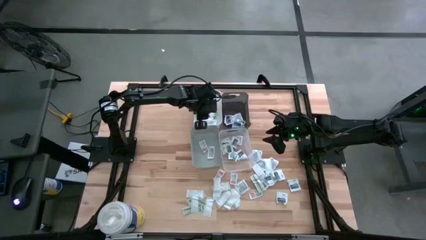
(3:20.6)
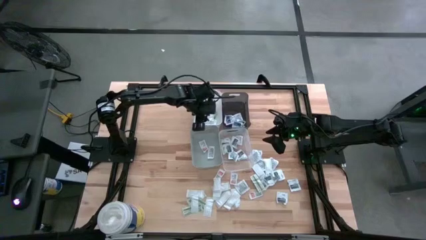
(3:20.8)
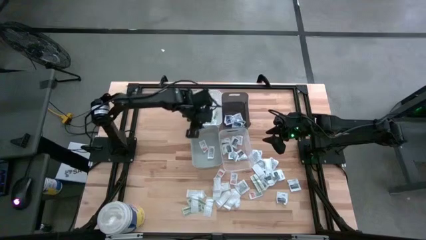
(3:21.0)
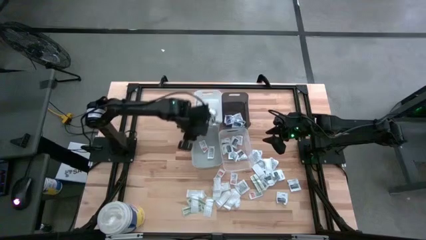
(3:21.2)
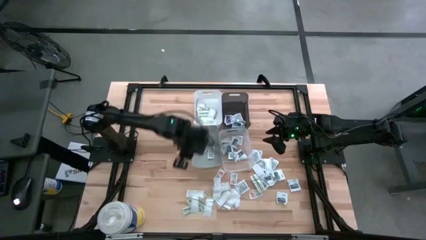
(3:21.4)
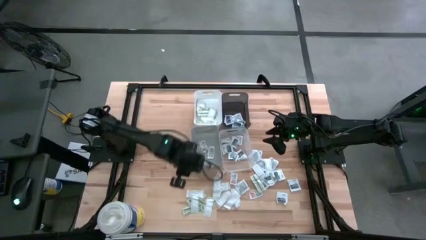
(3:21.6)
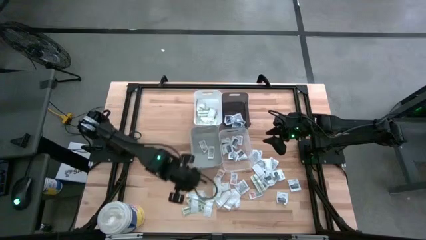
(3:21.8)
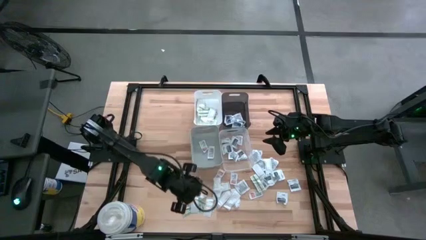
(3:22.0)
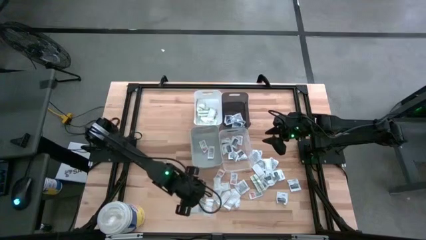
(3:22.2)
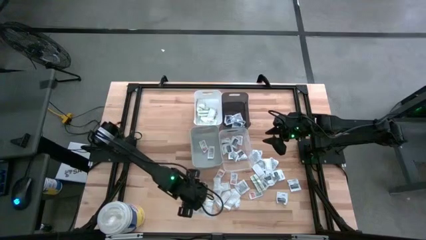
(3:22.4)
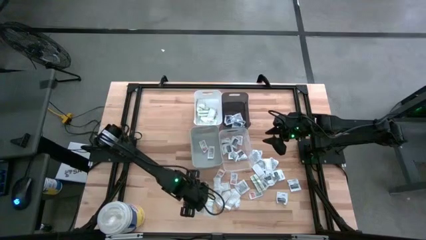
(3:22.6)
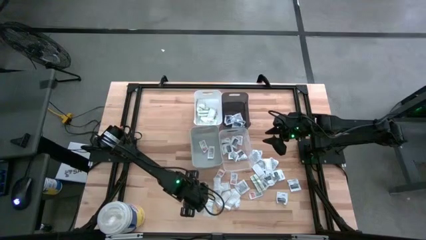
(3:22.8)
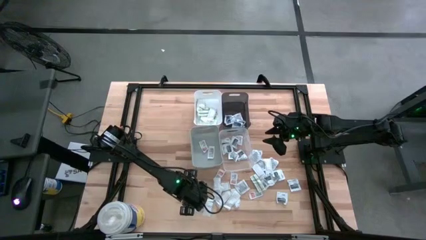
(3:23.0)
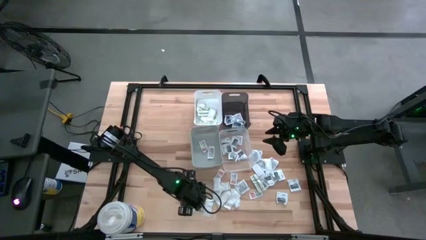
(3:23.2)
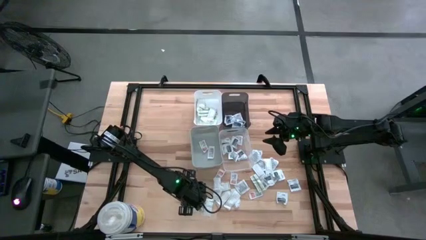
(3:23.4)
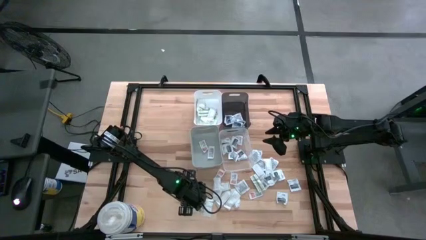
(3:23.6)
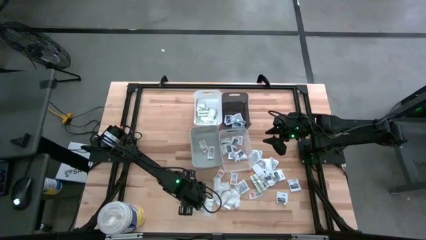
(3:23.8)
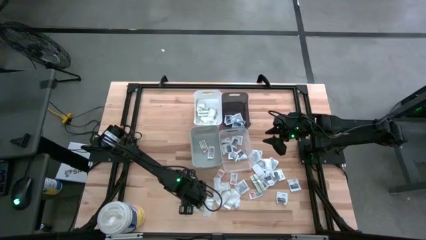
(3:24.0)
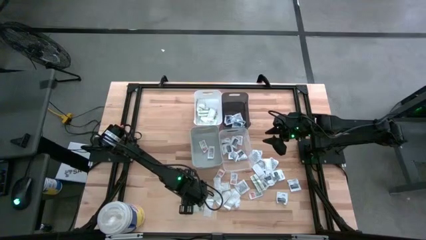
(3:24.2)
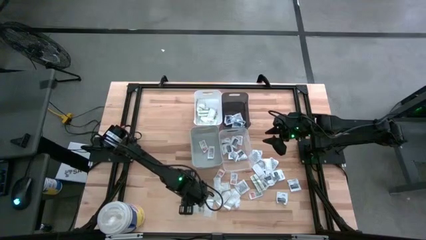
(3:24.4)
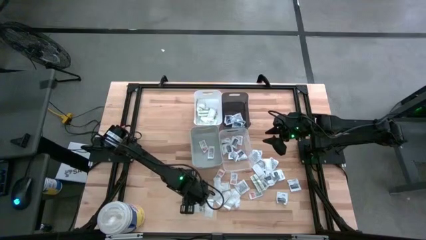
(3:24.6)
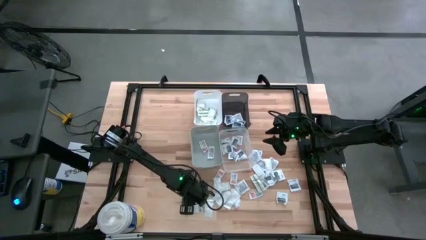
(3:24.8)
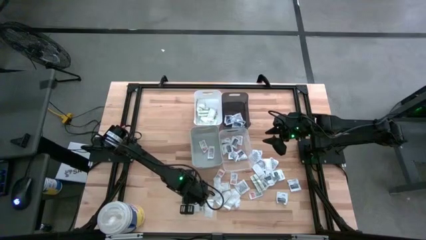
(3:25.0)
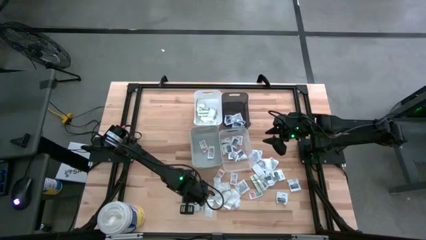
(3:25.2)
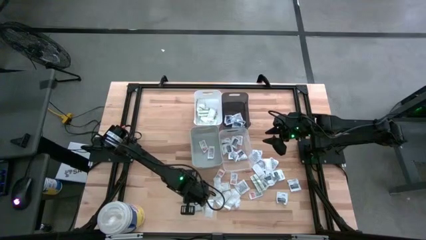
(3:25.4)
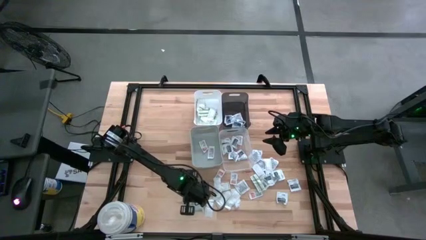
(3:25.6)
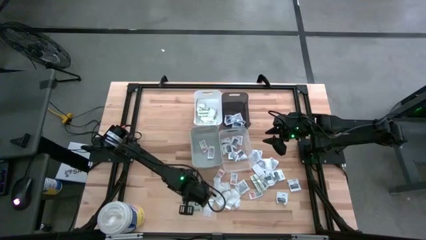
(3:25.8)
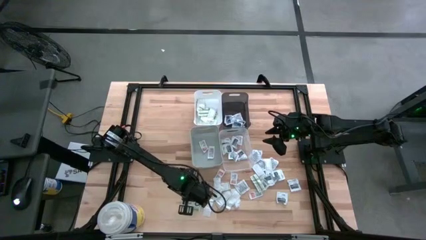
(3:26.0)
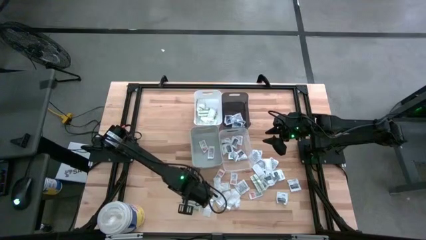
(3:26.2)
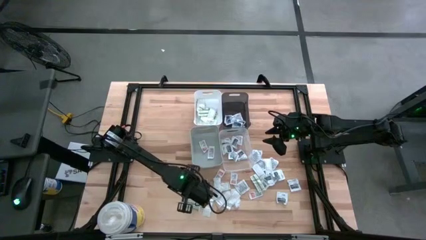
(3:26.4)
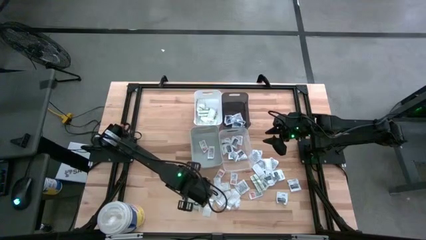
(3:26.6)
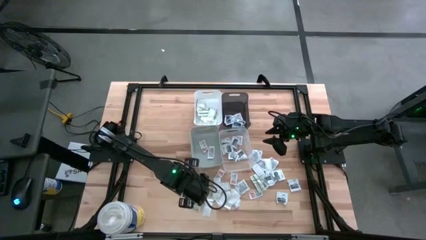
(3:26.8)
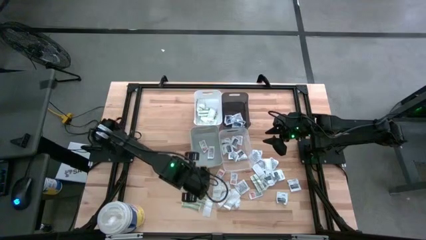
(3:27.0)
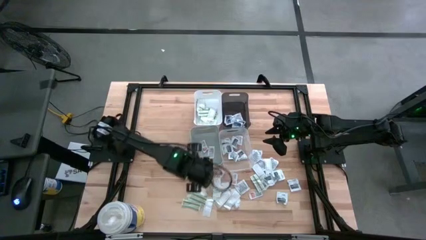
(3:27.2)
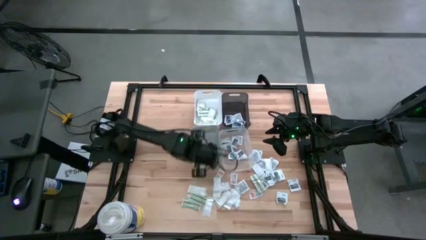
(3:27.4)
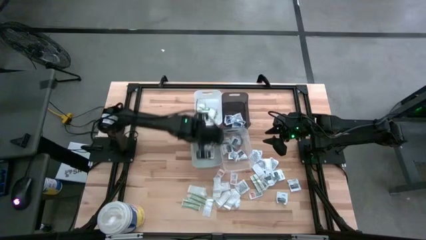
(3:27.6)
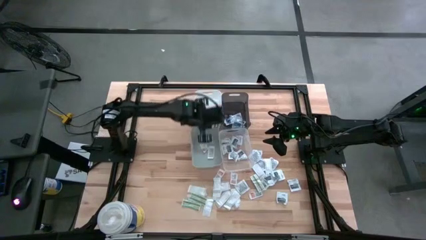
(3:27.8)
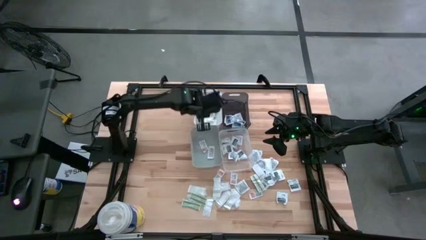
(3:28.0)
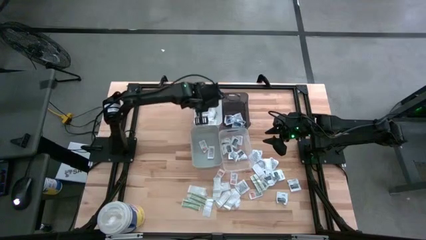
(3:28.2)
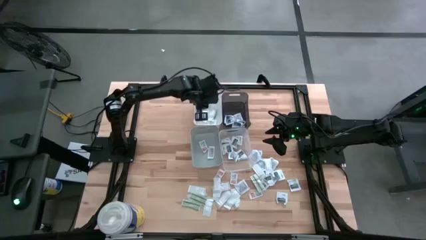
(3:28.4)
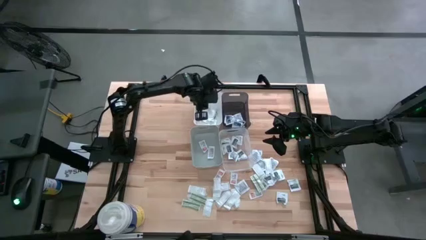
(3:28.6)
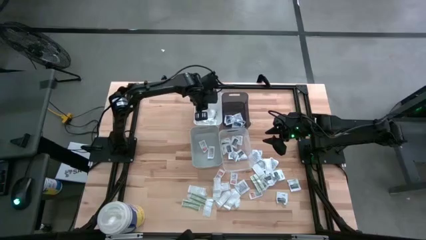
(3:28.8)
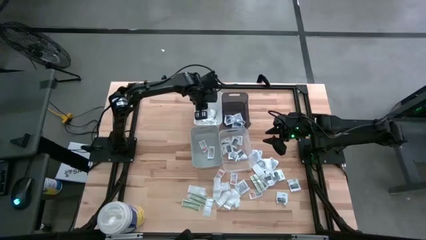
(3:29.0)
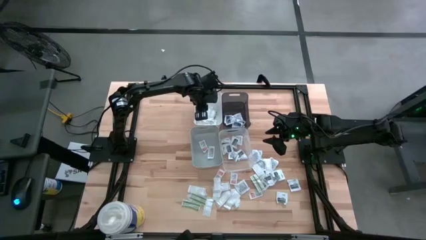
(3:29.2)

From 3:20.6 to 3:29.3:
Task: Pick & Place First Aid Supplies
Put the green bandage pack into the white bin

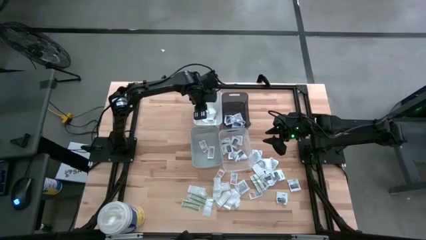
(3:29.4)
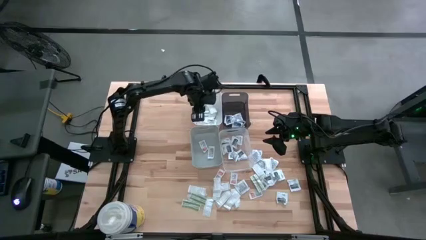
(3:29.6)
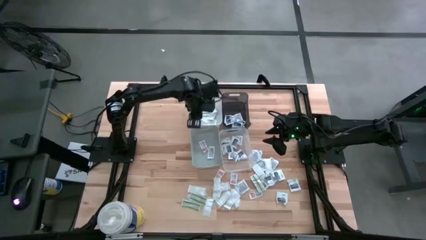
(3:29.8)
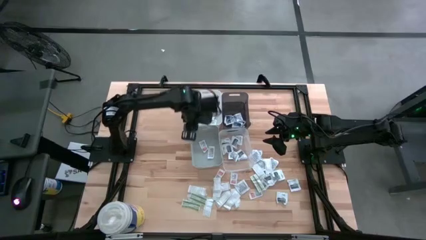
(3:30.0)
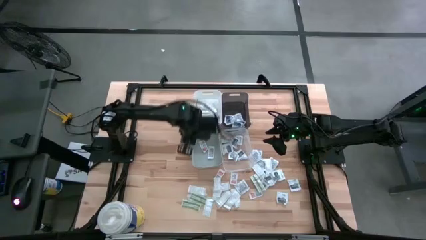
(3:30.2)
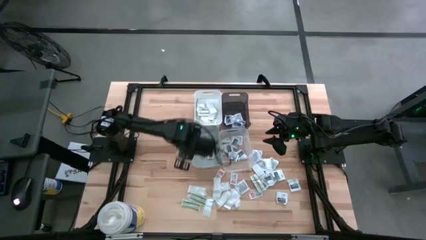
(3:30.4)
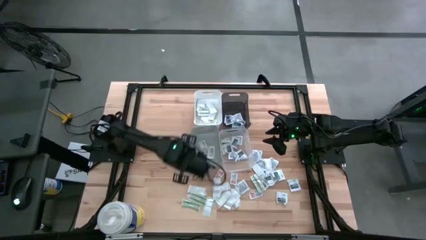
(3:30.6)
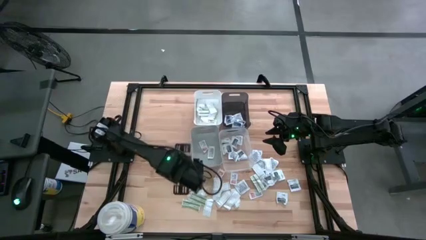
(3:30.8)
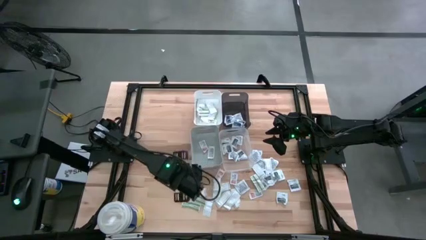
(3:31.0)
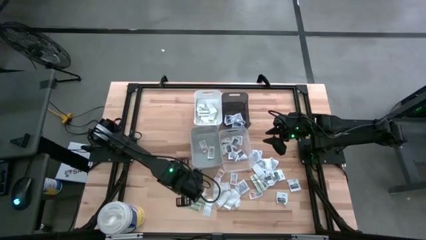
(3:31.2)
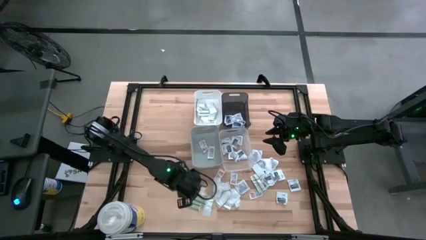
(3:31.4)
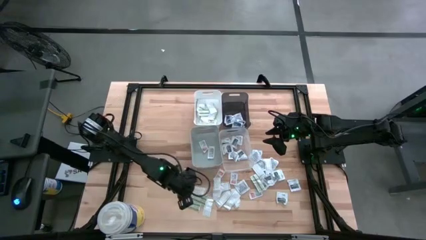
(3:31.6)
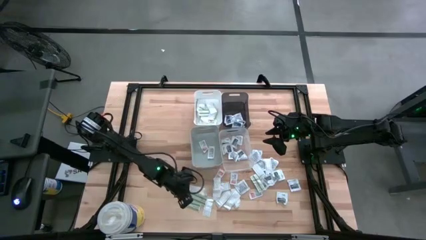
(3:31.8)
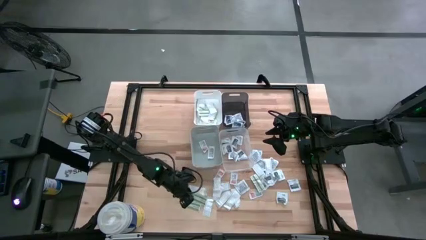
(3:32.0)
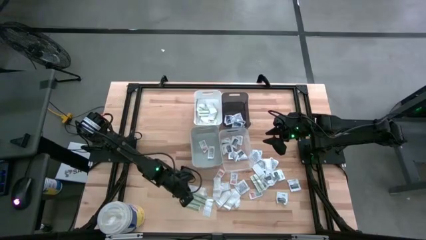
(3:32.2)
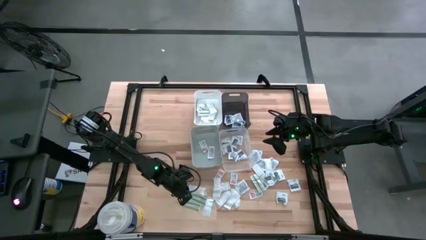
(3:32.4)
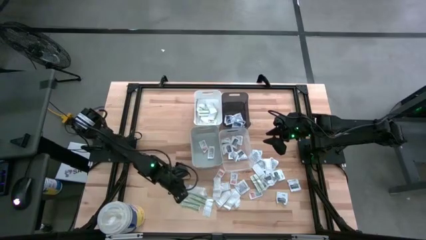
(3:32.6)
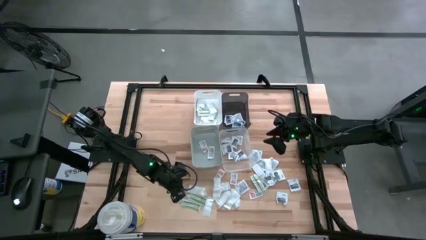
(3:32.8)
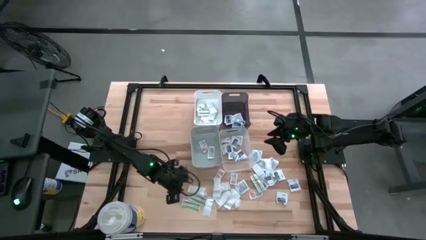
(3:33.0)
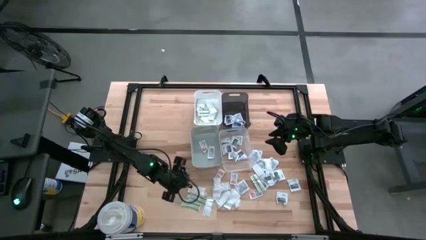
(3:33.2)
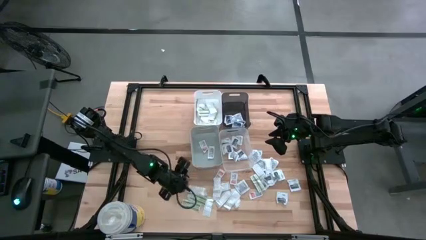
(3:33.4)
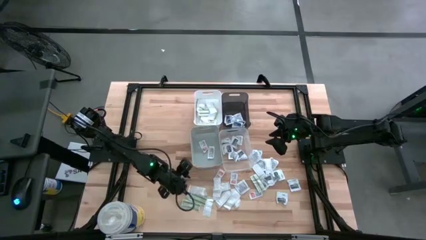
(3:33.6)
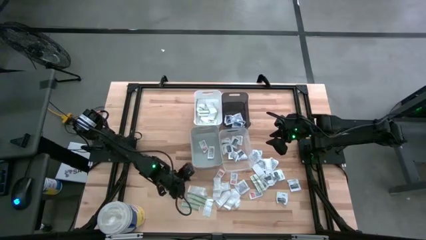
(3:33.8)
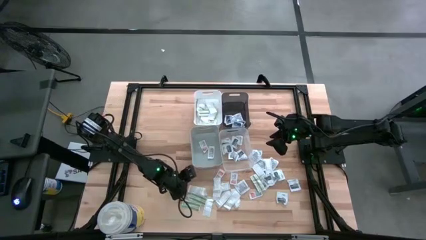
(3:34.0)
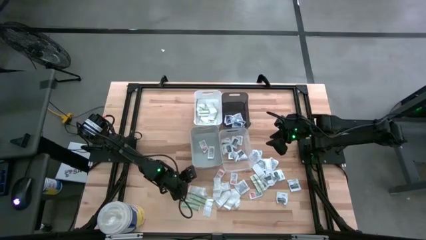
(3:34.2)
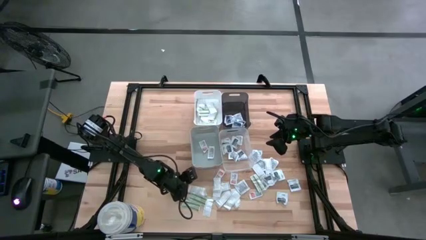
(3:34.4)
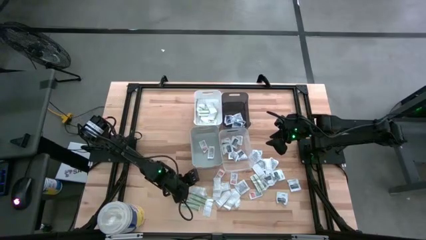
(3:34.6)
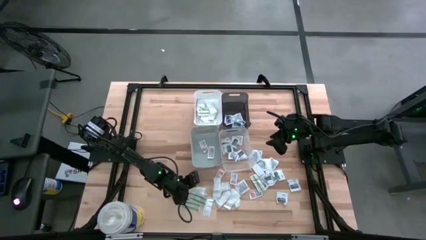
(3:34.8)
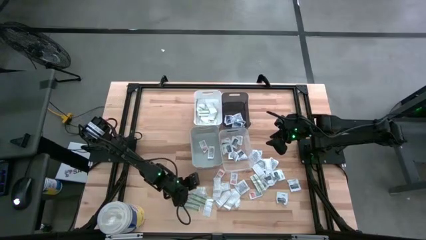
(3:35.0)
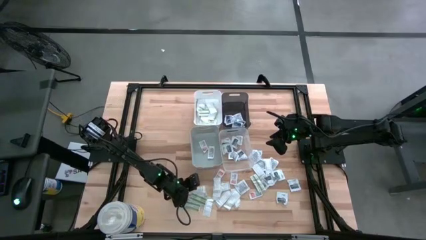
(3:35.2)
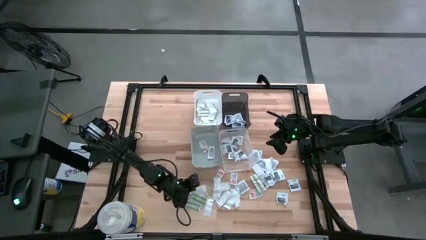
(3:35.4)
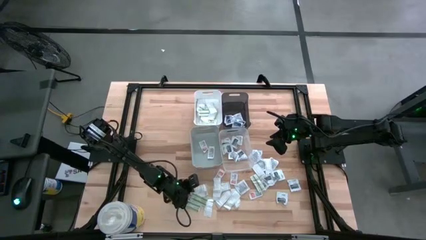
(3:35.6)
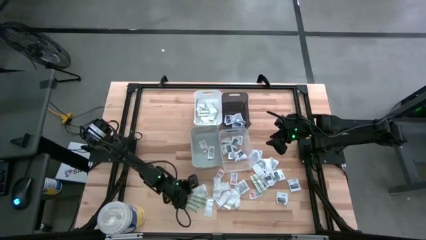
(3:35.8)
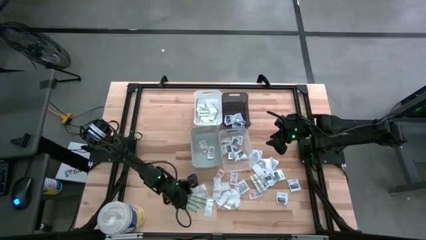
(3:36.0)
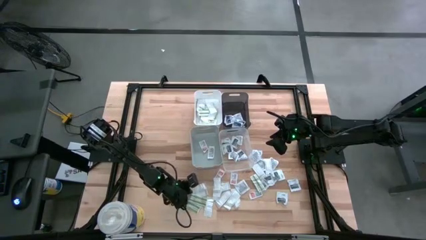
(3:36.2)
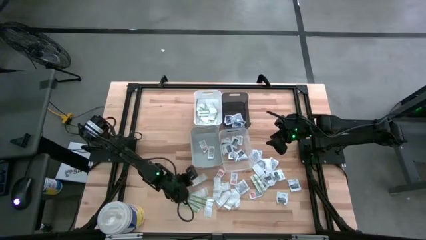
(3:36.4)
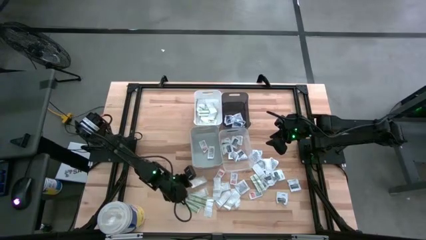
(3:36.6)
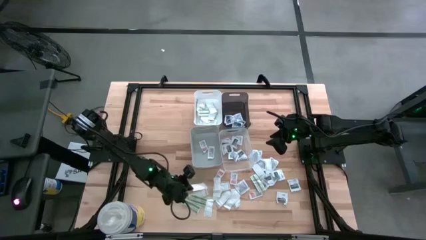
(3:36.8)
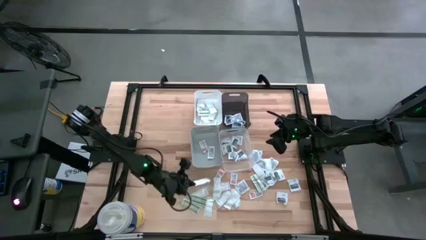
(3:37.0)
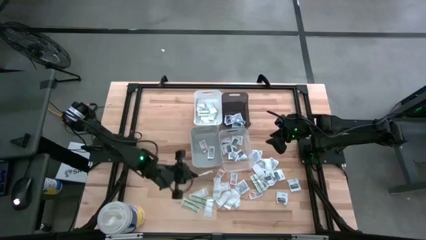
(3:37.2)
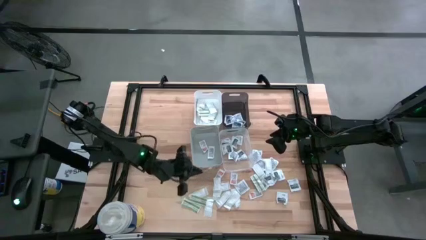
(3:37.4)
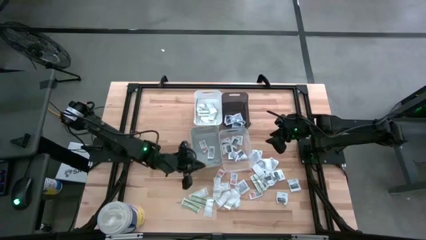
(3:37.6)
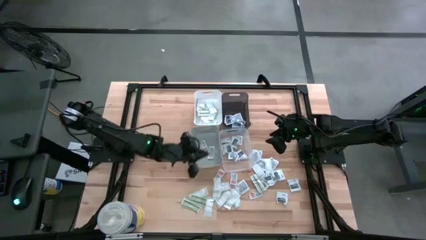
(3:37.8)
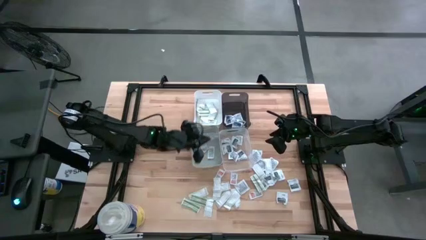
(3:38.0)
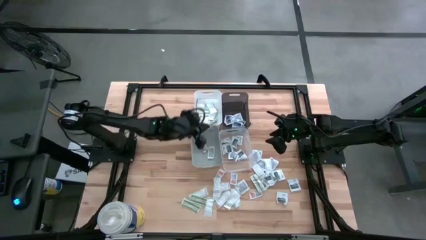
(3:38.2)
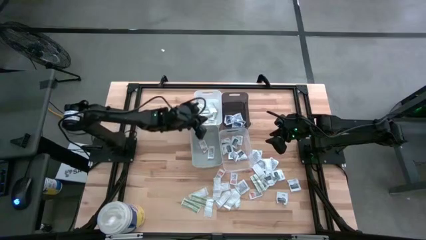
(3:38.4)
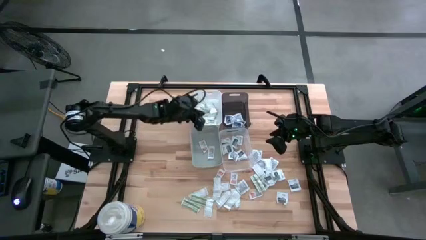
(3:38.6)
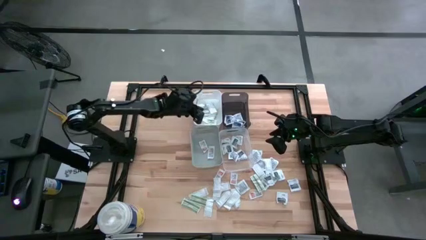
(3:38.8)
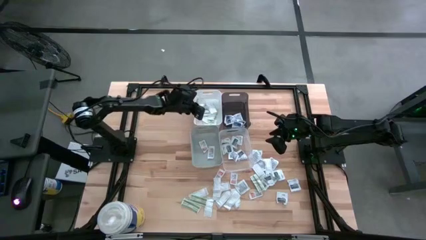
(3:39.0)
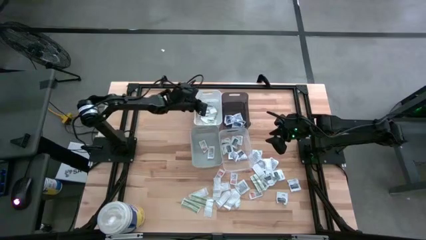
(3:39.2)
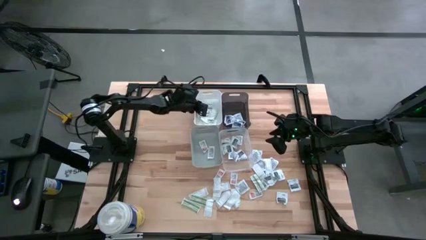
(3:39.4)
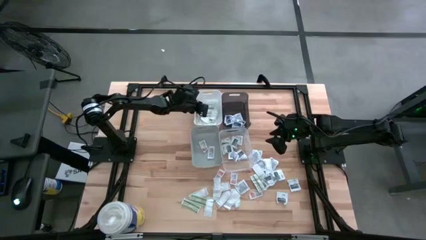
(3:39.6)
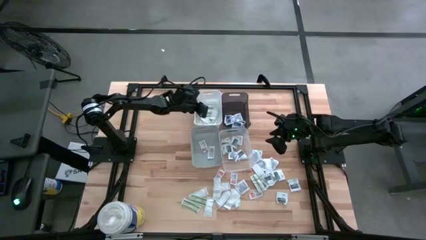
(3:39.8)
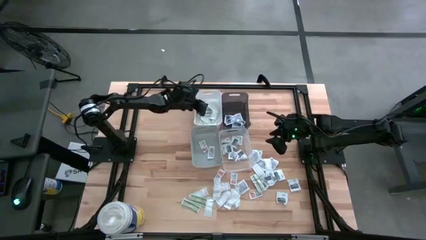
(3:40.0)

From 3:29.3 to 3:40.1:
Put the green bandage pack into the white bin
